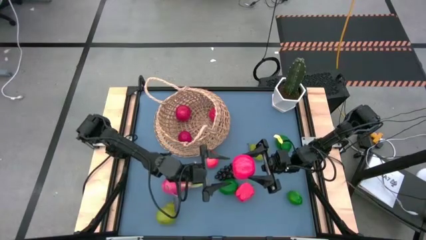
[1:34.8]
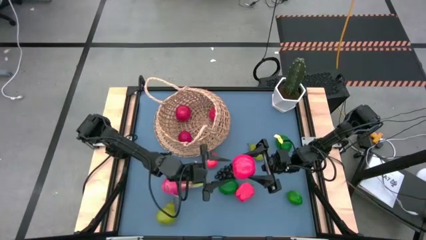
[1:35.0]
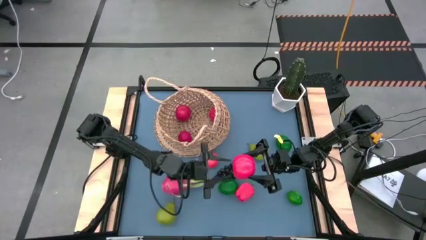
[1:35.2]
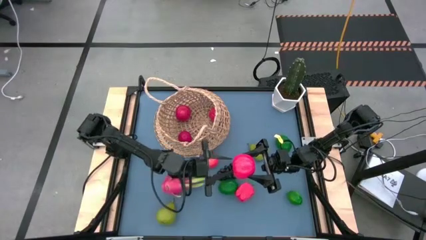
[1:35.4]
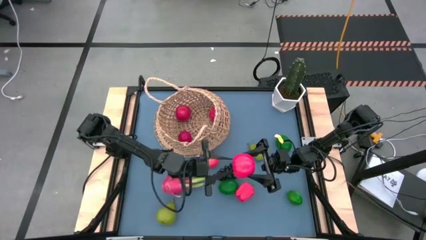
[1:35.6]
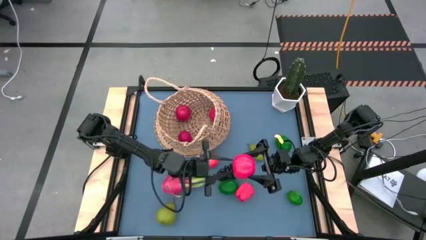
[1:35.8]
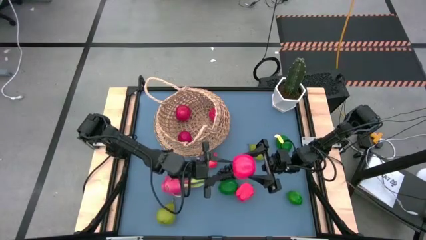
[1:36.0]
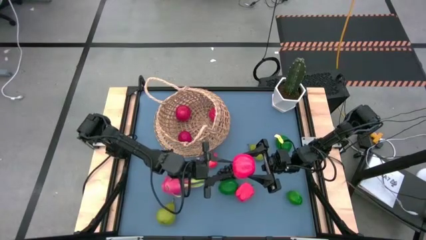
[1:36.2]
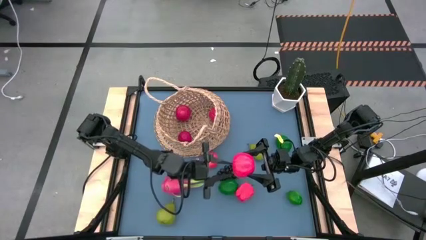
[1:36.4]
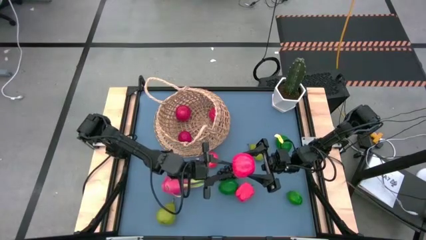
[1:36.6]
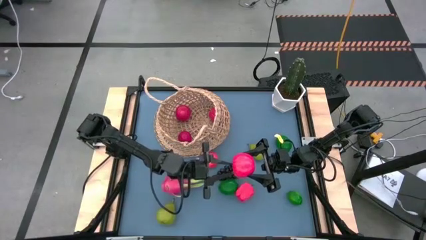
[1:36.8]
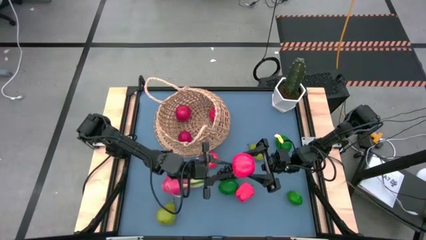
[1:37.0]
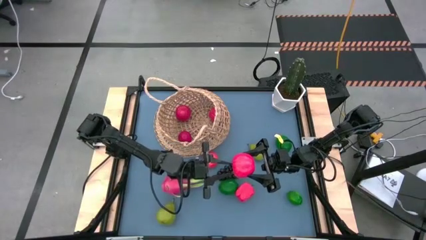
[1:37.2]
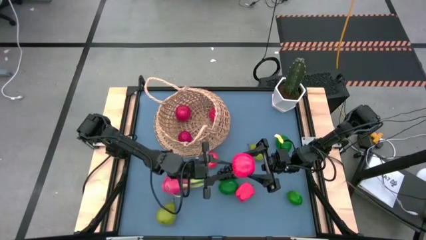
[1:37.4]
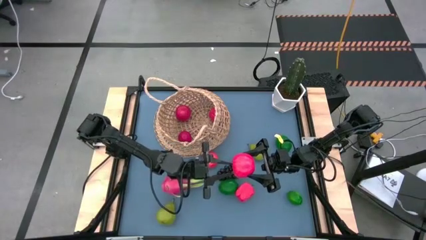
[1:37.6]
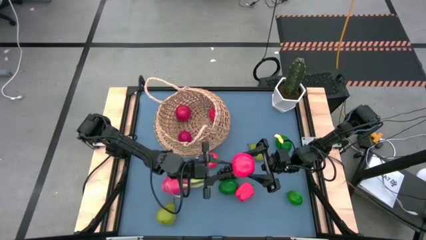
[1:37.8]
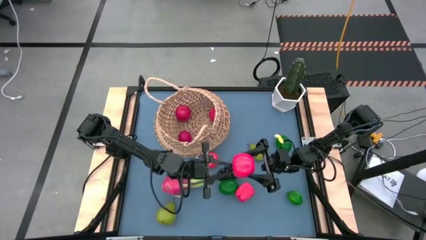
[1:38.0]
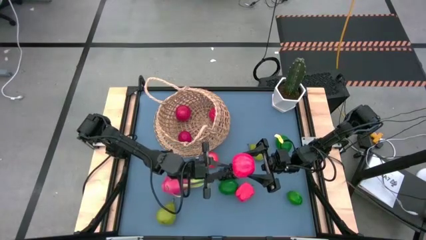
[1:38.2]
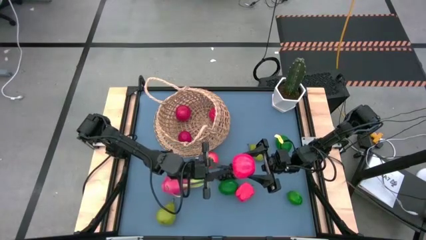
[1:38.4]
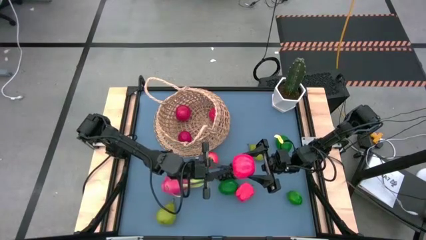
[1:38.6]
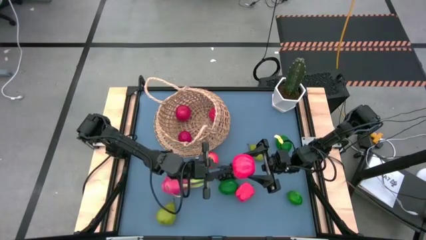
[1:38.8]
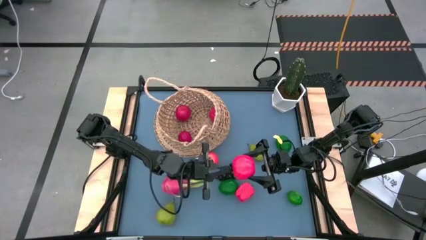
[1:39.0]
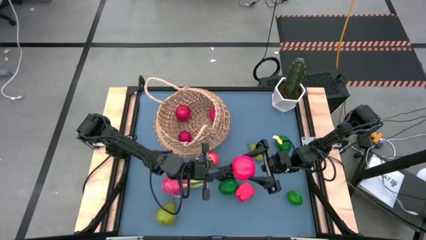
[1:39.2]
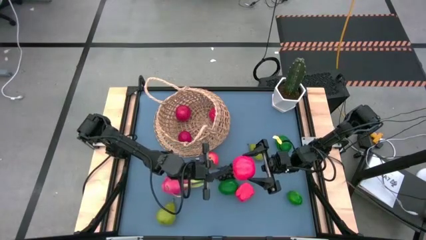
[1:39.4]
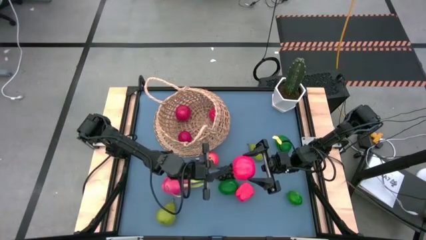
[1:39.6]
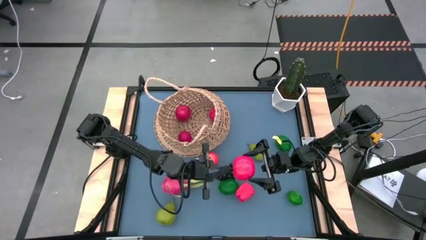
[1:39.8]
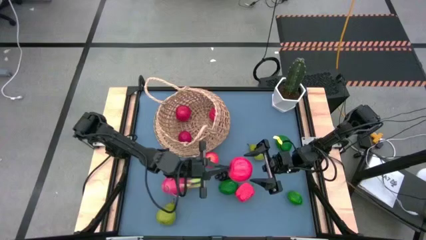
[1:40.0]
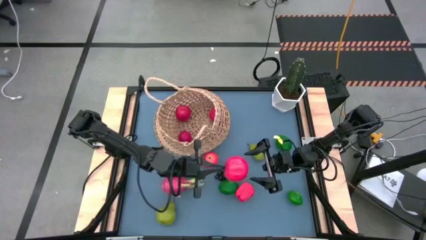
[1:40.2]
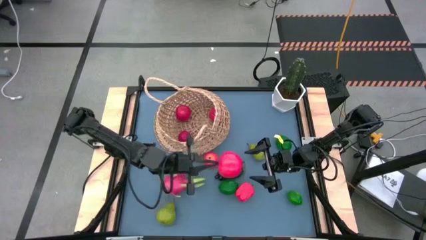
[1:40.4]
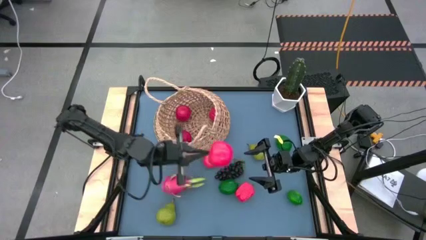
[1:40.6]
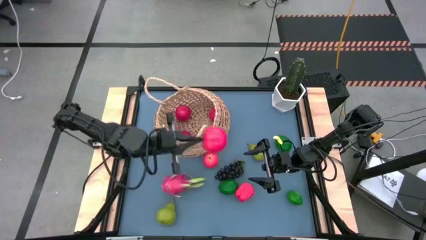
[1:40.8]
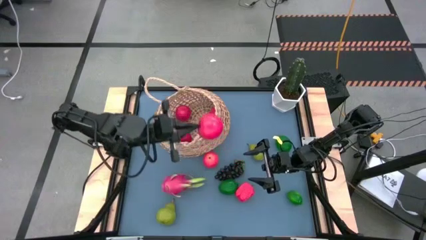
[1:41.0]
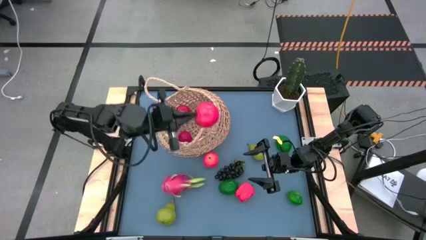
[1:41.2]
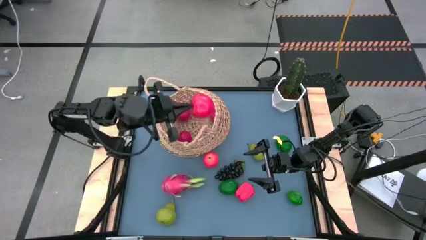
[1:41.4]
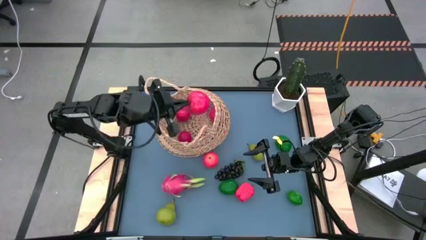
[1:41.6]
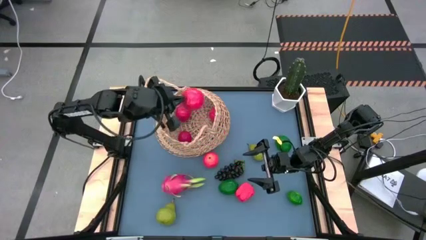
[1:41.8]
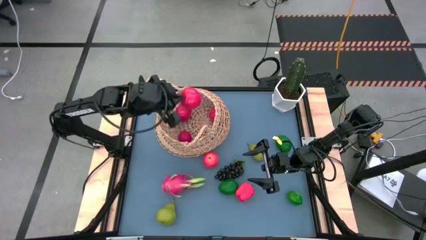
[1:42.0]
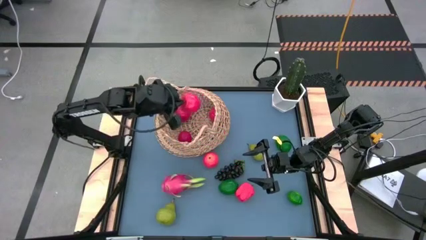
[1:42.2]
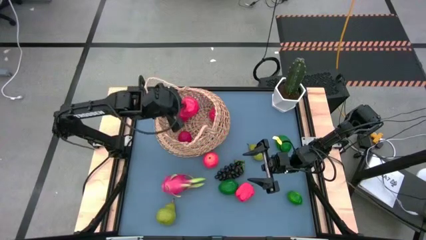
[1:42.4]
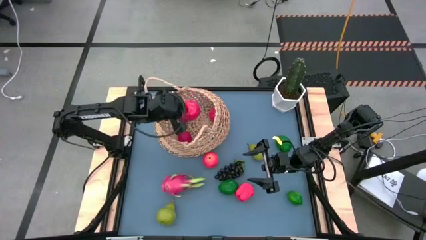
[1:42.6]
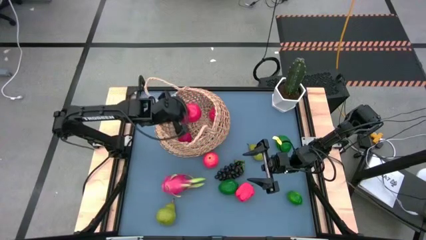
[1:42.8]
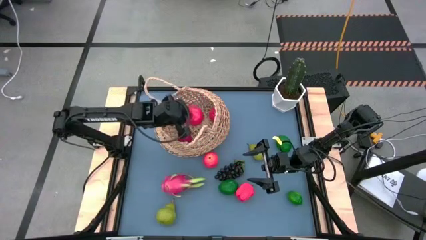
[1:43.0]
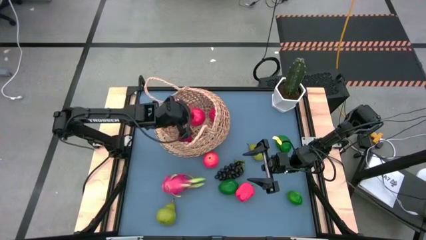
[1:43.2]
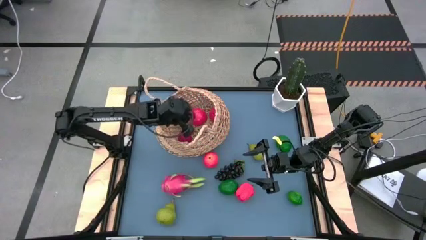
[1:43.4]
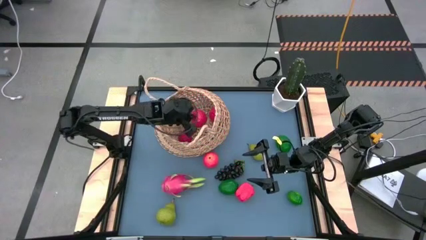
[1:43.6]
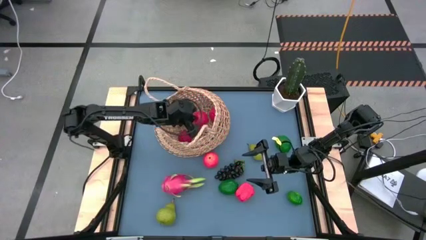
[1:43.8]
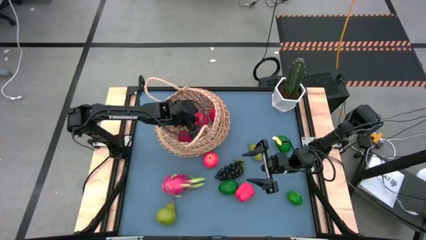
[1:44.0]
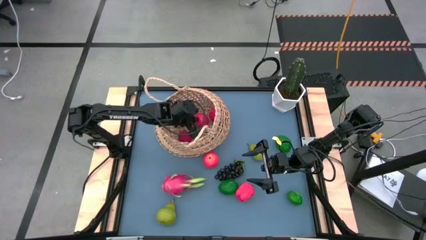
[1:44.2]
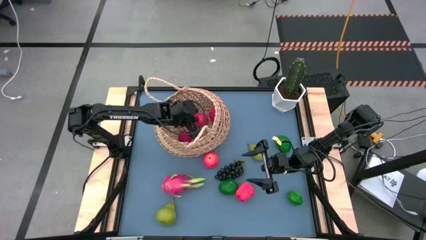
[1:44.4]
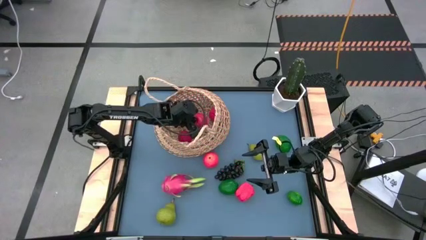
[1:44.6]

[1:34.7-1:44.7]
Task: Build produce basket
Put the red apple into the basket
